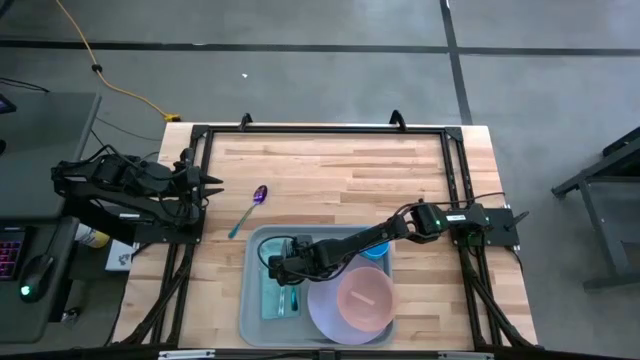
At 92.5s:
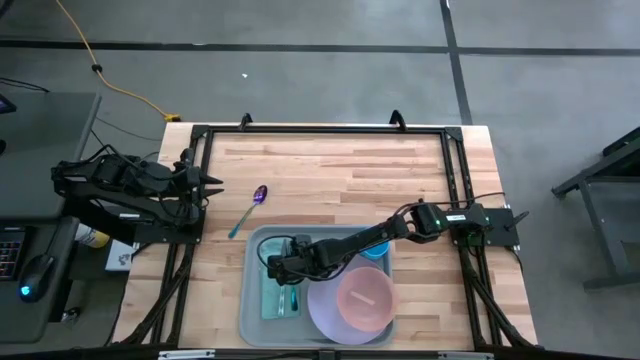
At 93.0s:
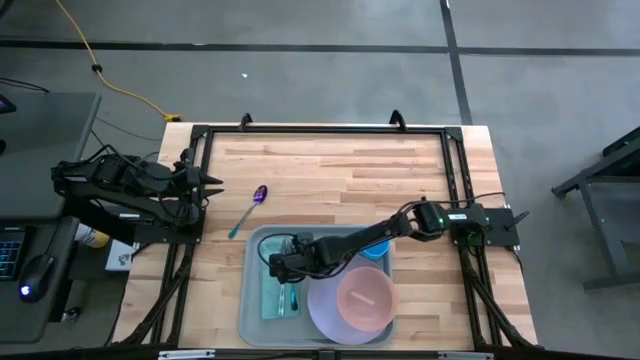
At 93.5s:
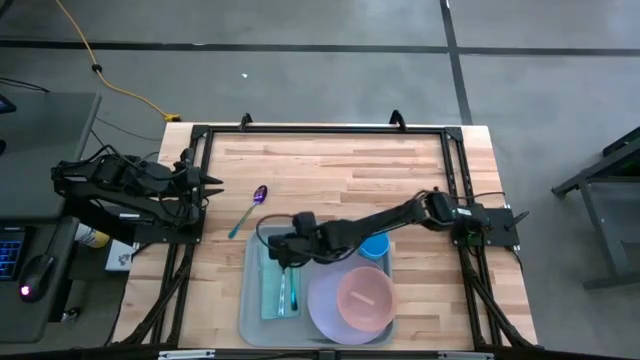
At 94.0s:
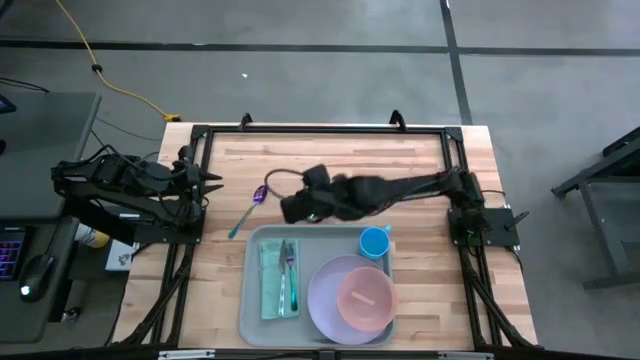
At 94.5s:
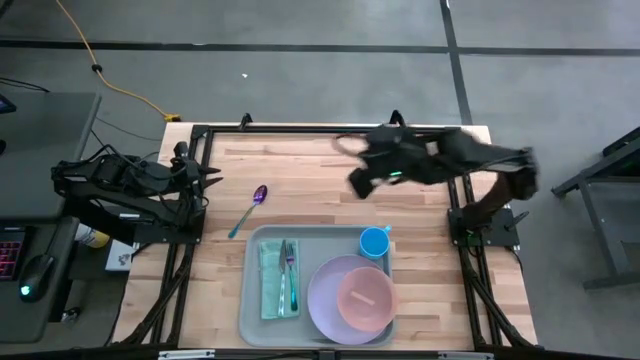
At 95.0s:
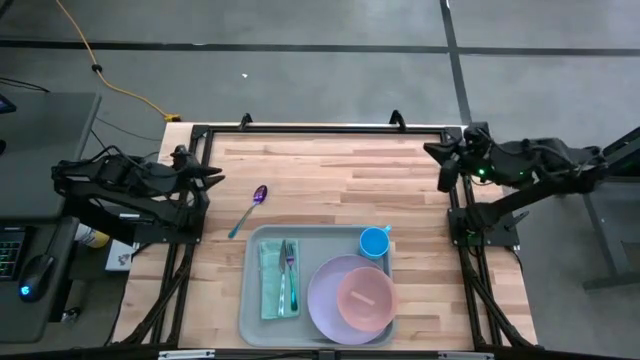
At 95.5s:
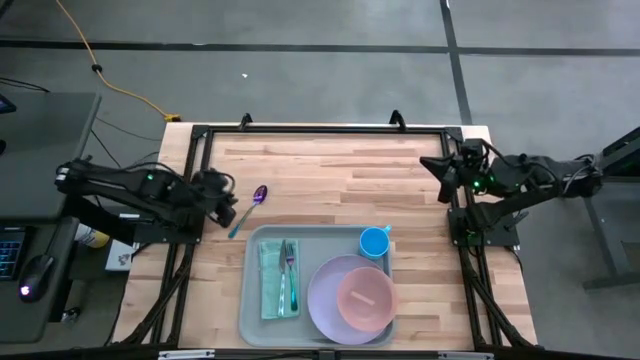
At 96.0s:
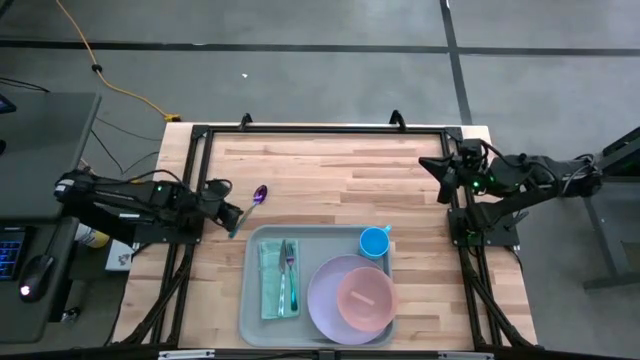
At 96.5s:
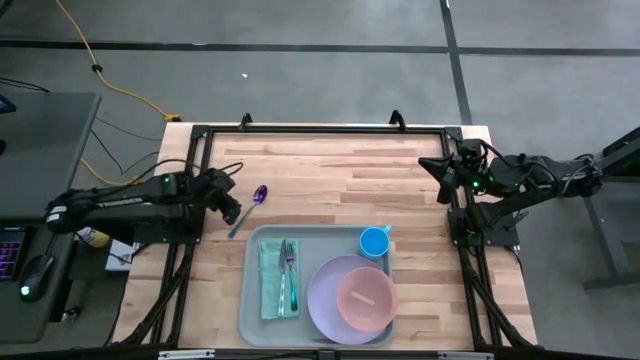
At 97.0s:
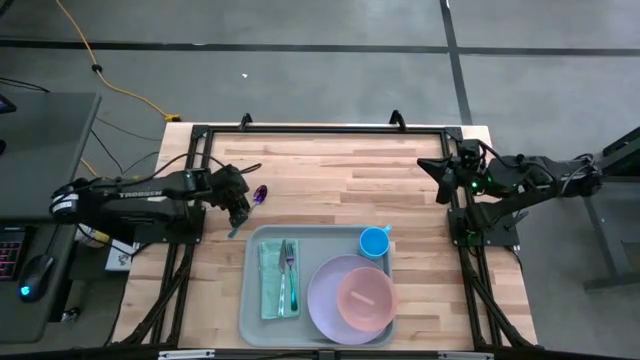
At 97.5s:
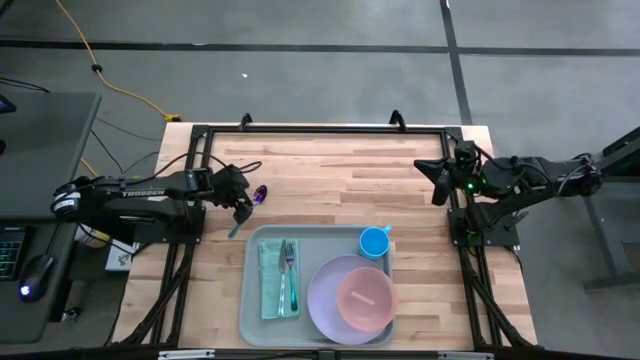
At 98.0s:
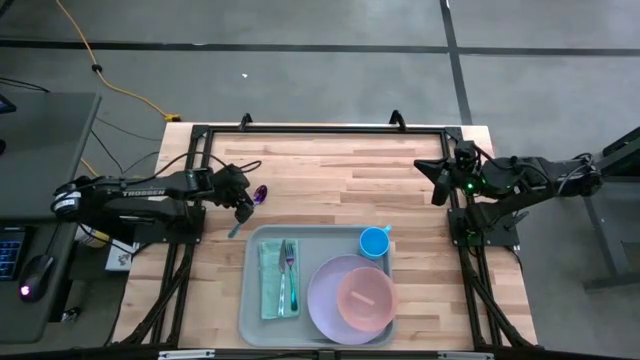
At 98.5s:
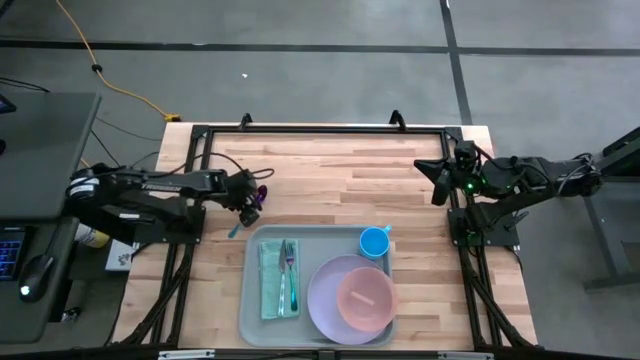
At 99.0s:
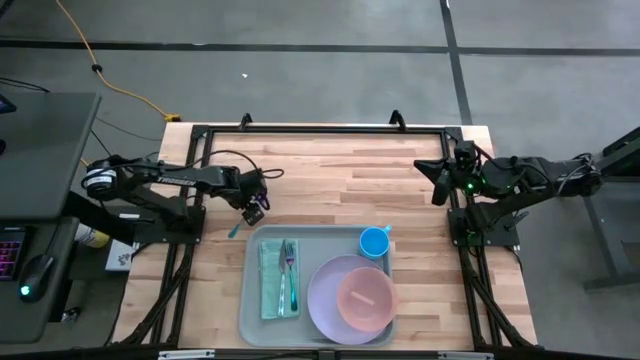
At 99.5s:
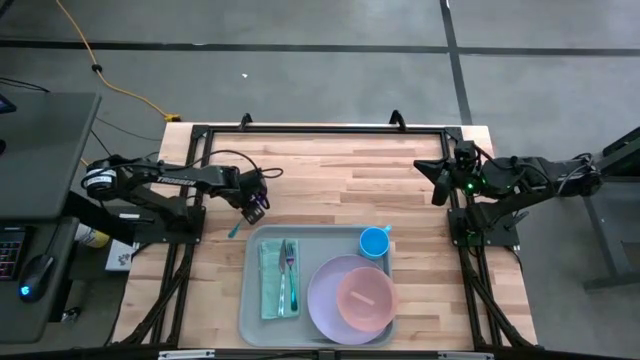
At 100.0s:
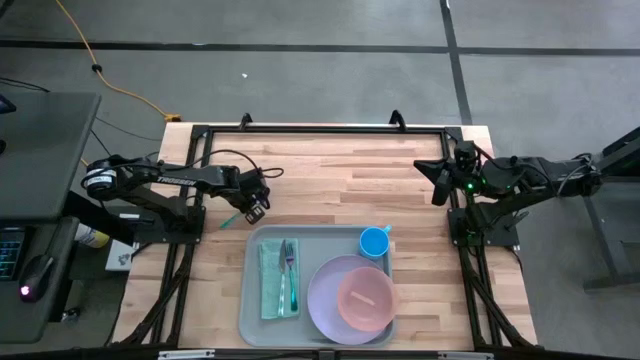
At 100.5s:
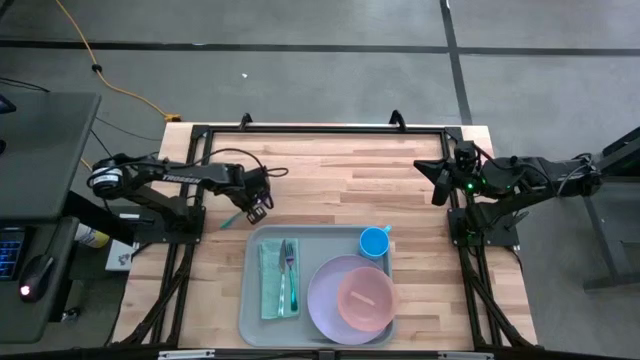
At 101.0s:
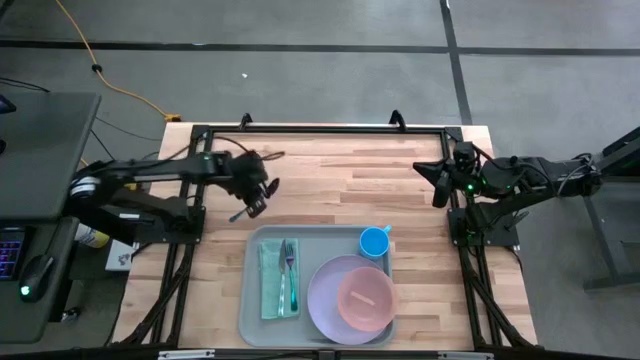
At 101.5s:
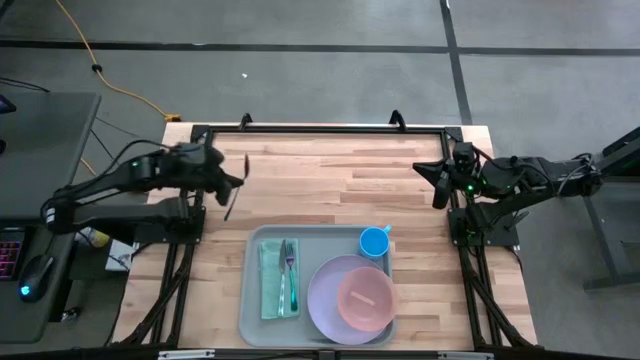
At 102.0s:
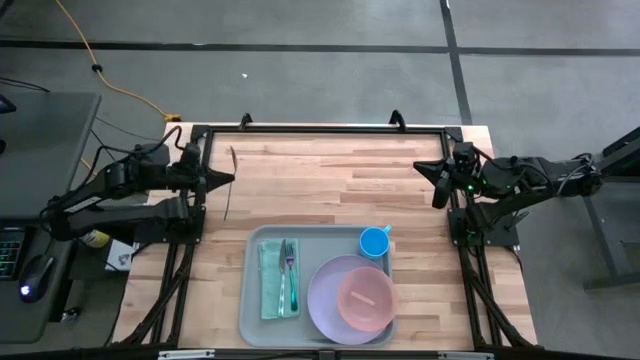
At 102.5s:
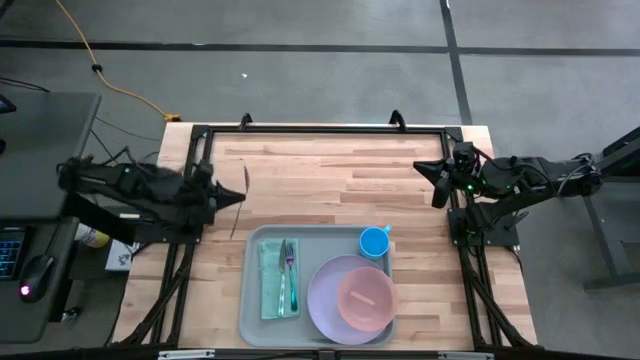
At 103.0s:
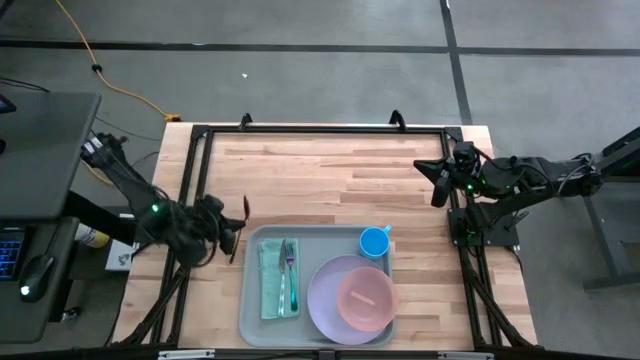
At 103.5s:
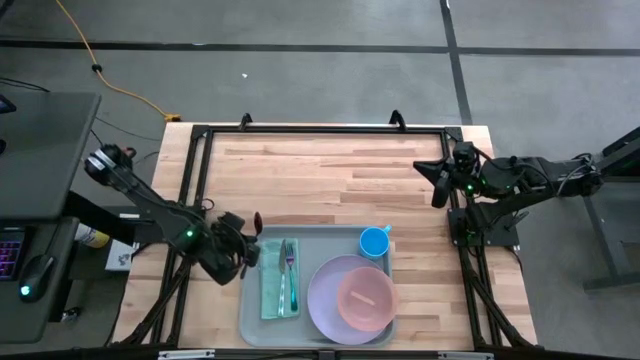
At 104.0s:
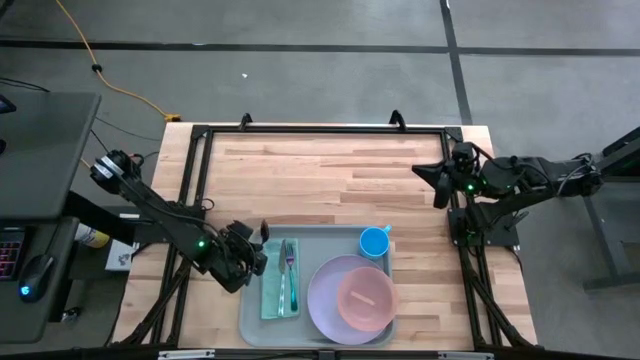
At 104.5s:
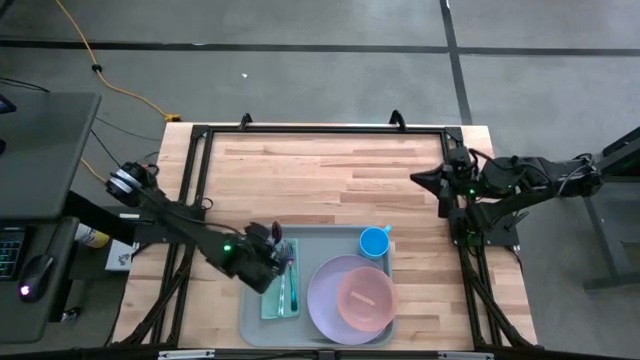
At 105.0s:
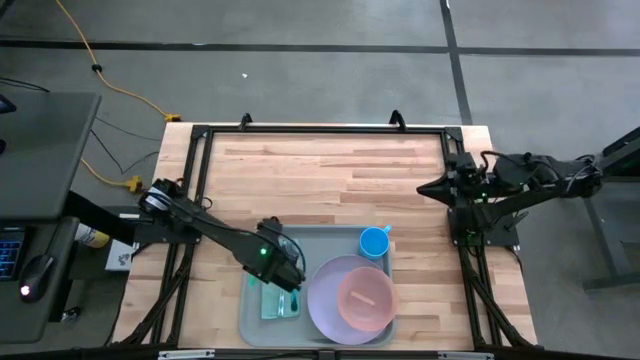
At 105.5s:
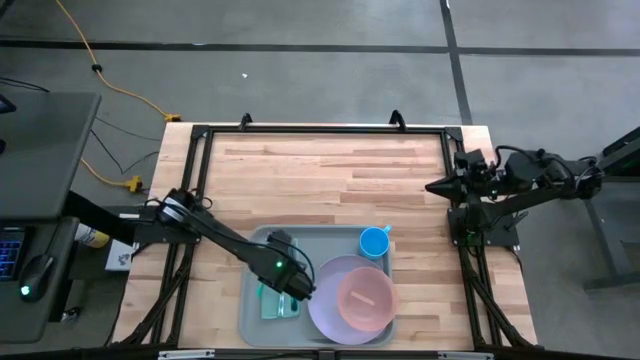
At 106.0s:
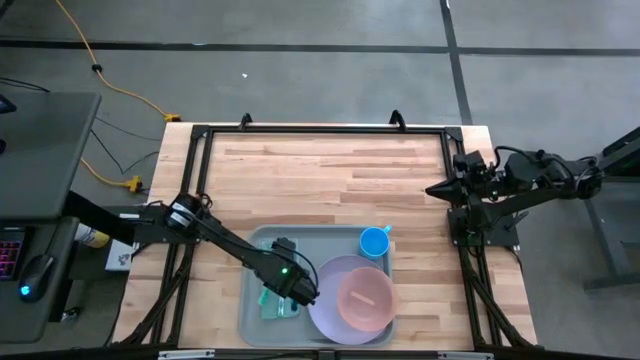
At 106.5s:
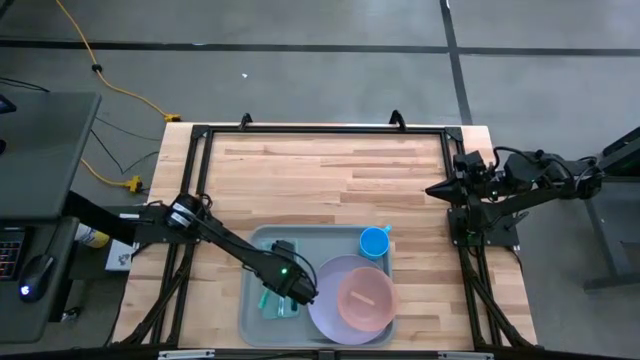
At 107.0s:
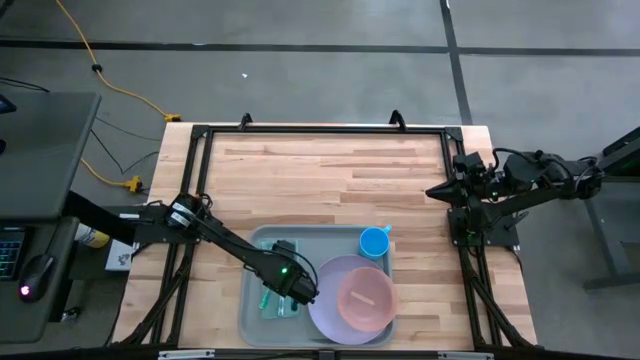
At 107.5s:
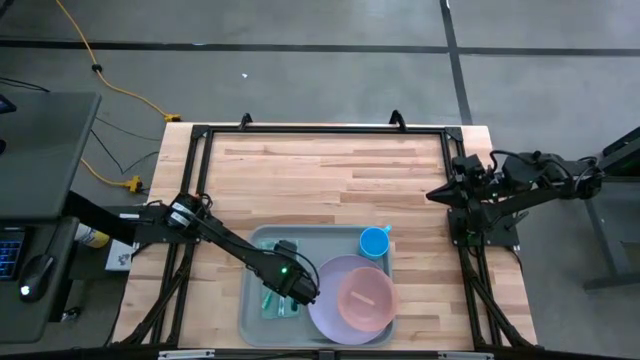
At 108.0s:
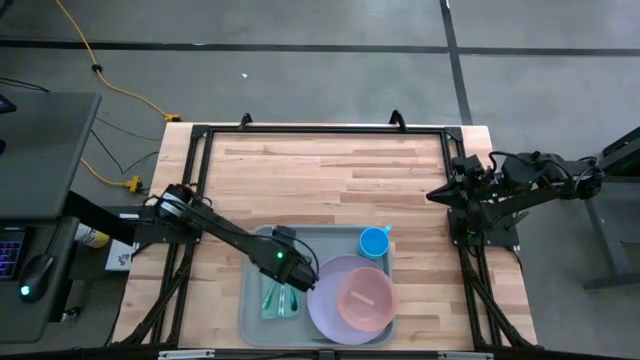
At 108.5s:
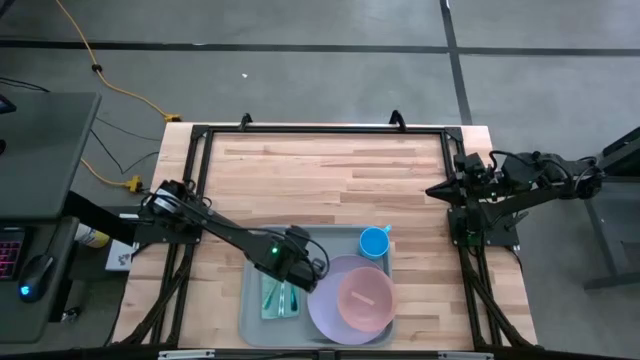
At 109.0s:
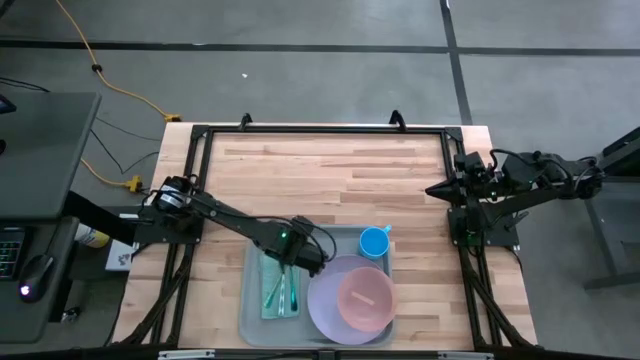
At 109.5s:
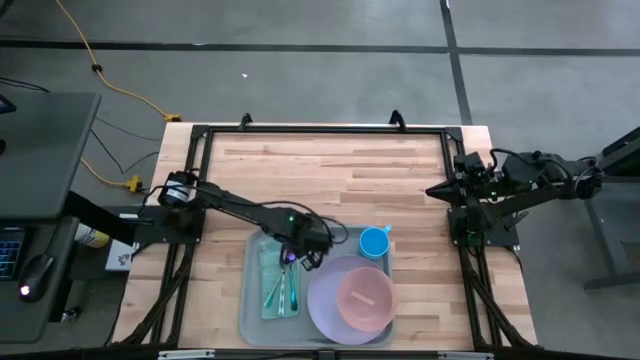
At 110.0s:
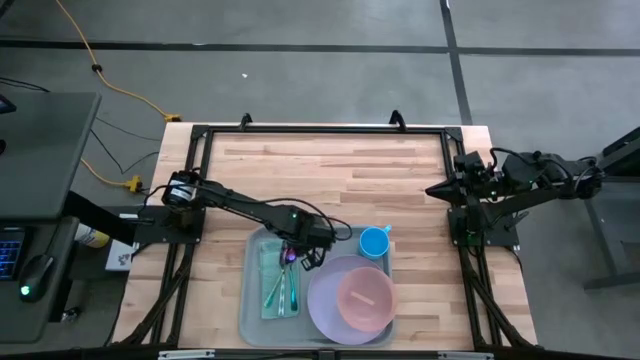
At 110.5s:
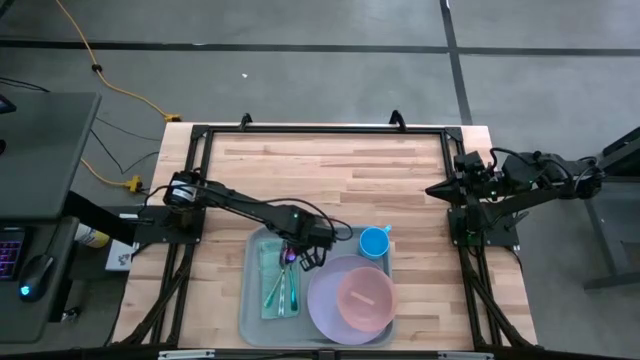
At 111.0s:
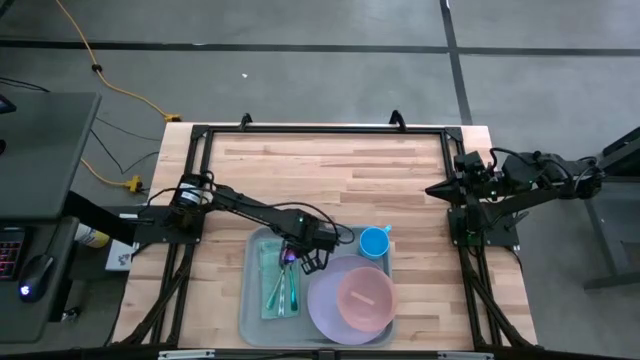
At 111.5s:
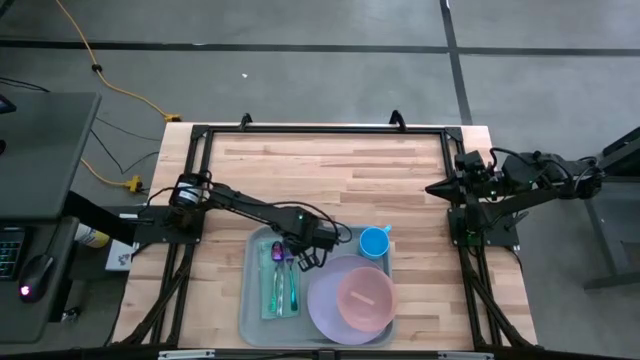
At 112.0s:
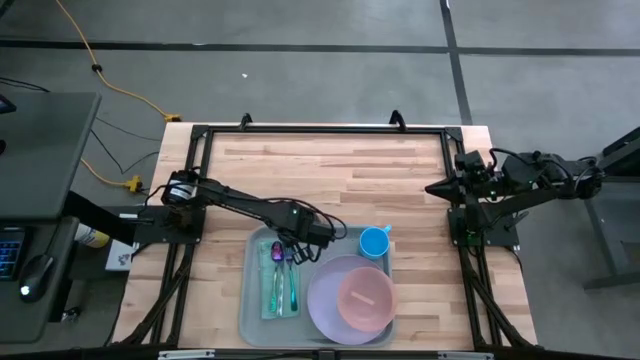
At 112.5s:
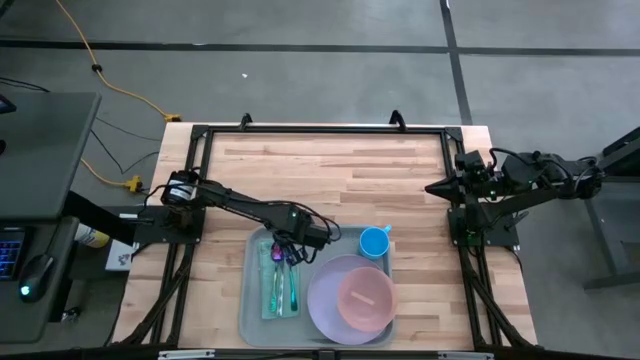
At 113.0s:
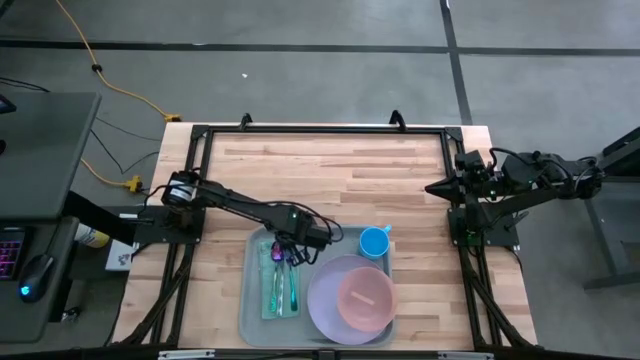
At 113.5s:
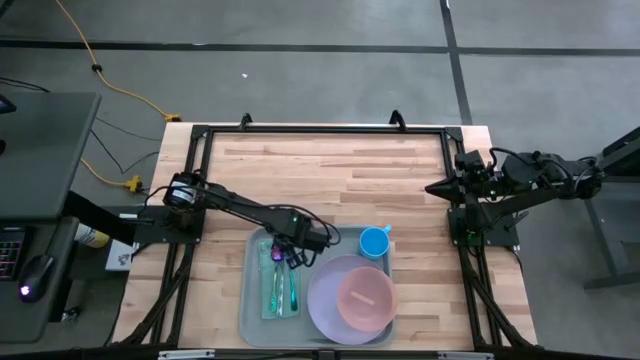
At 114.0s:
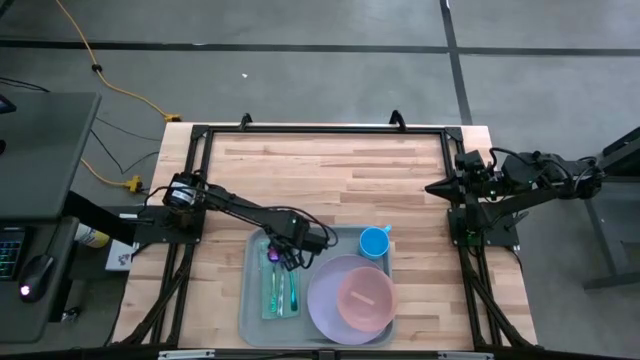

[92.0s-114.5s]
Task: Set up tray
Put the violet spoon on the light blue napkin to the left of the green patterned knife
